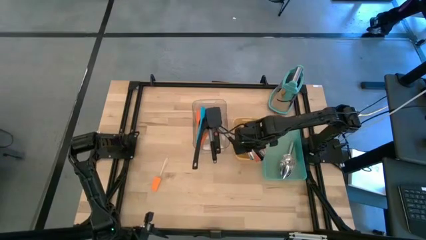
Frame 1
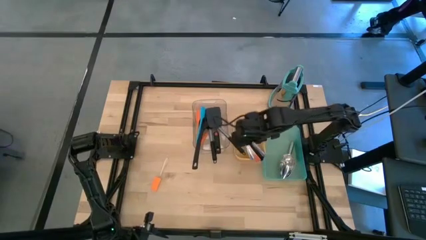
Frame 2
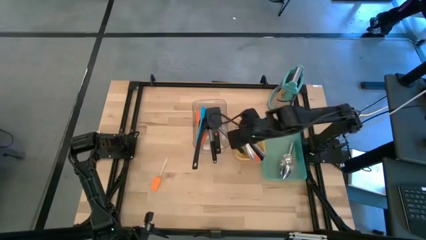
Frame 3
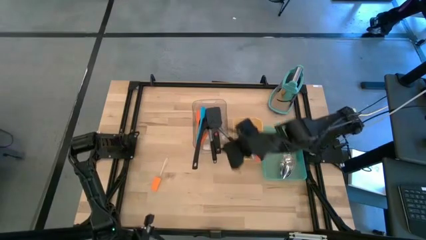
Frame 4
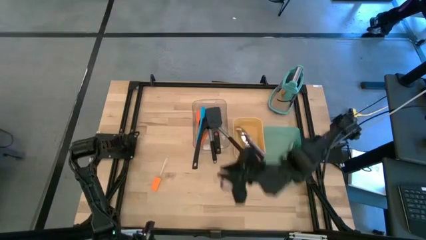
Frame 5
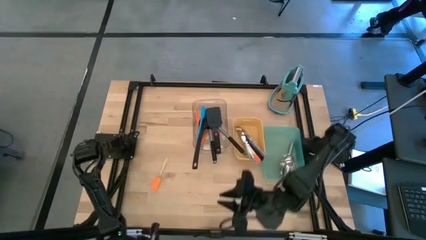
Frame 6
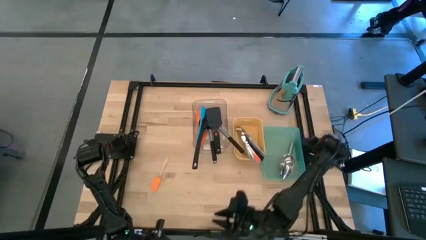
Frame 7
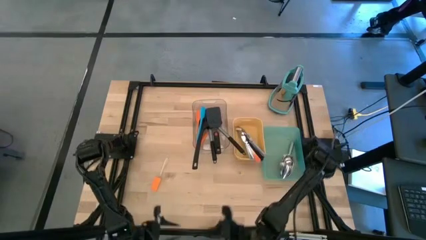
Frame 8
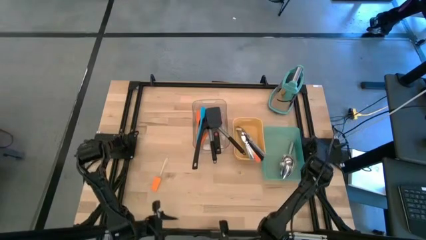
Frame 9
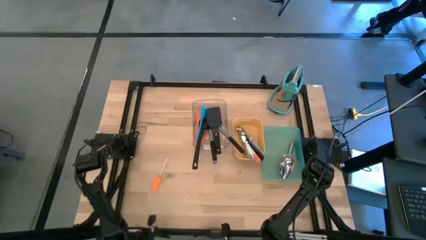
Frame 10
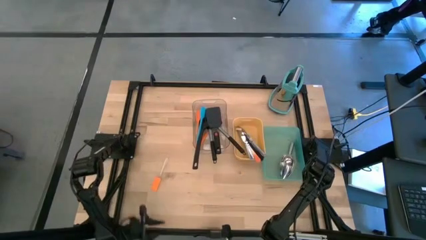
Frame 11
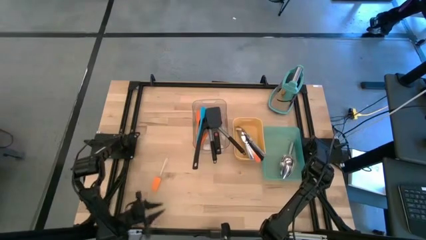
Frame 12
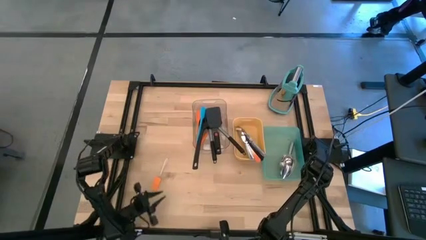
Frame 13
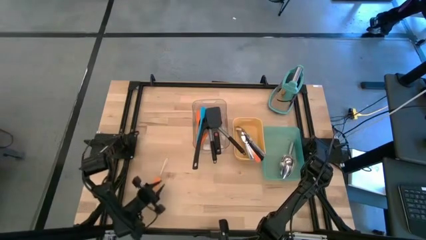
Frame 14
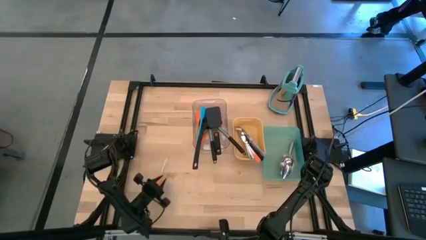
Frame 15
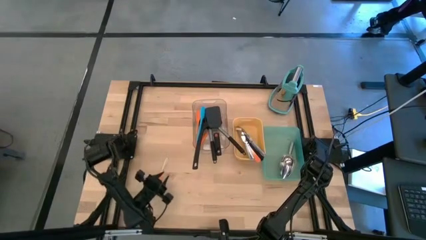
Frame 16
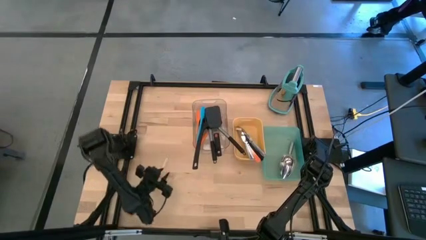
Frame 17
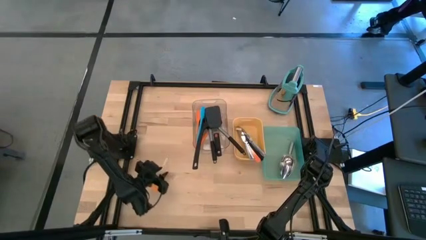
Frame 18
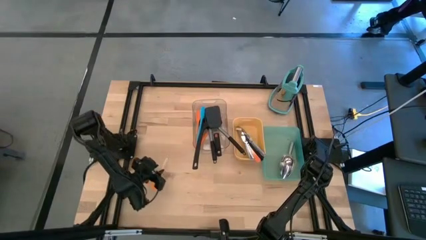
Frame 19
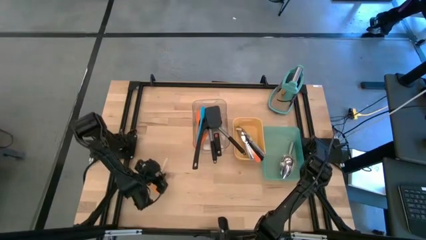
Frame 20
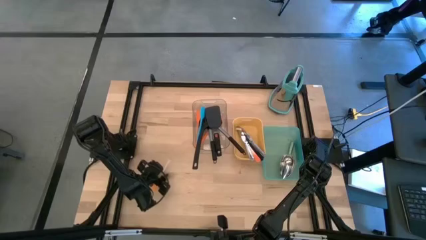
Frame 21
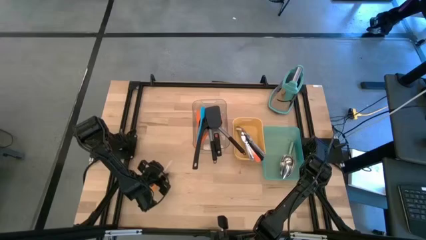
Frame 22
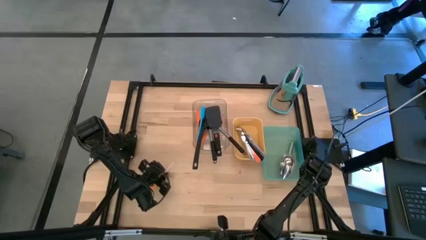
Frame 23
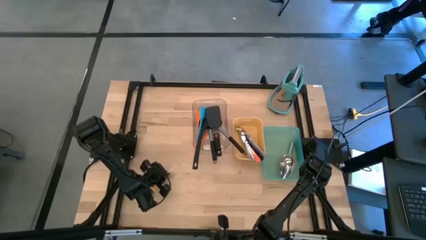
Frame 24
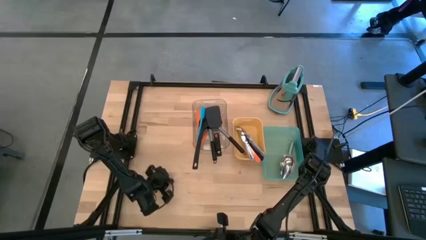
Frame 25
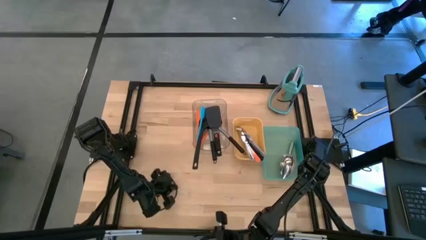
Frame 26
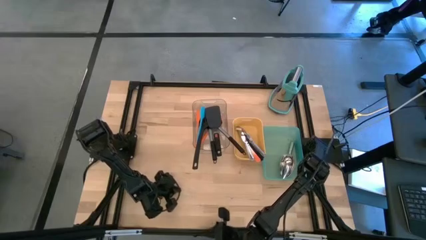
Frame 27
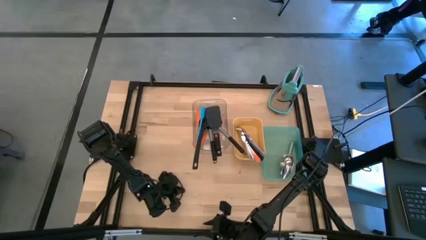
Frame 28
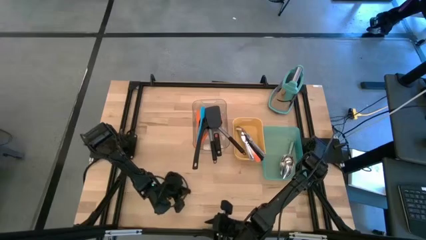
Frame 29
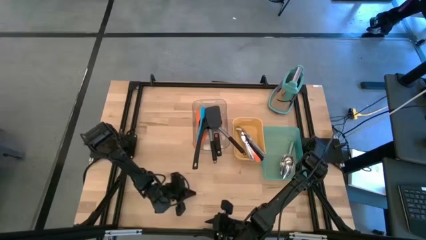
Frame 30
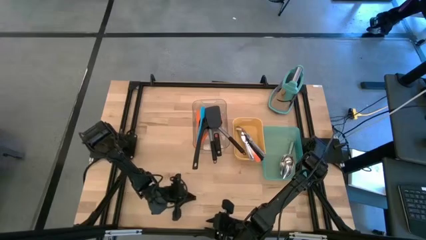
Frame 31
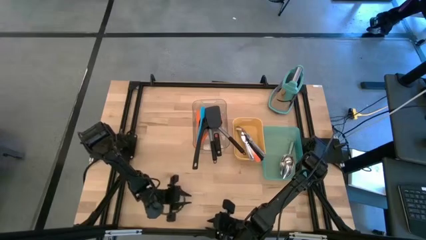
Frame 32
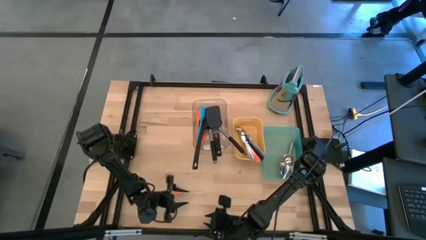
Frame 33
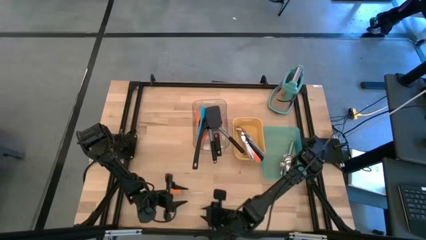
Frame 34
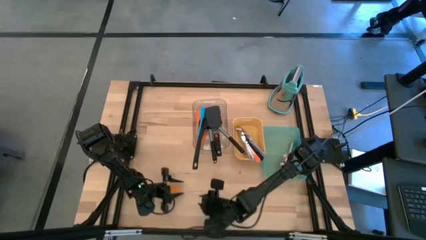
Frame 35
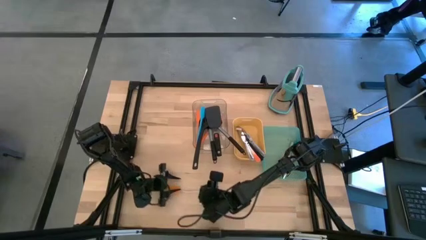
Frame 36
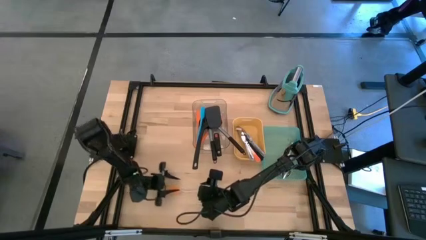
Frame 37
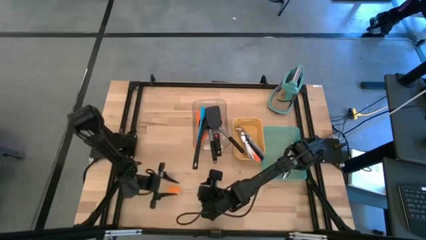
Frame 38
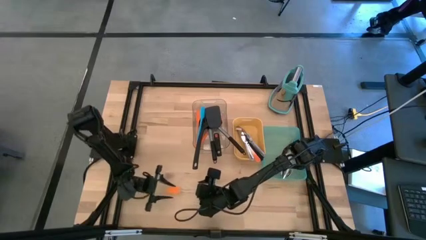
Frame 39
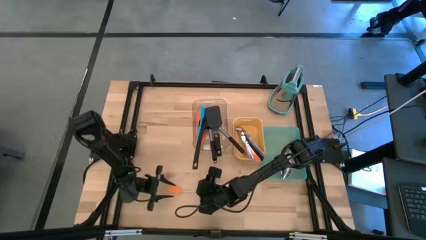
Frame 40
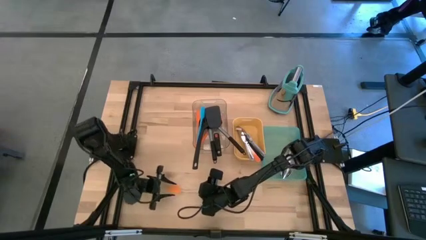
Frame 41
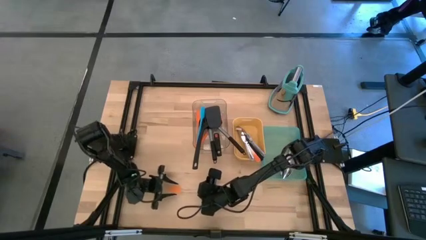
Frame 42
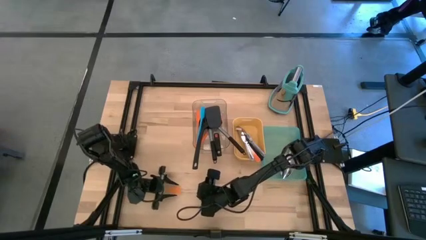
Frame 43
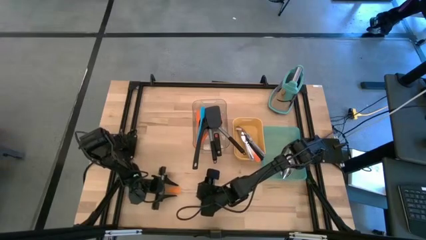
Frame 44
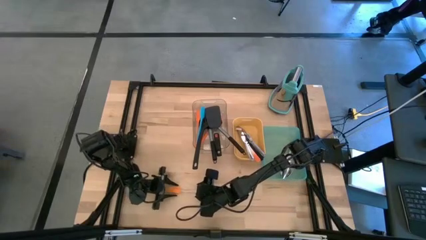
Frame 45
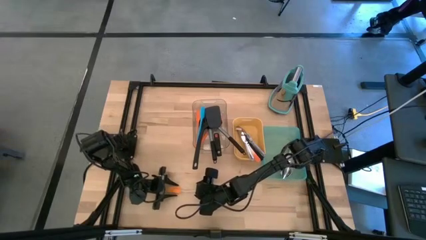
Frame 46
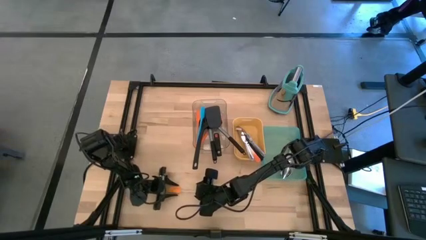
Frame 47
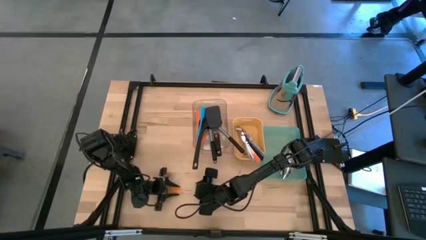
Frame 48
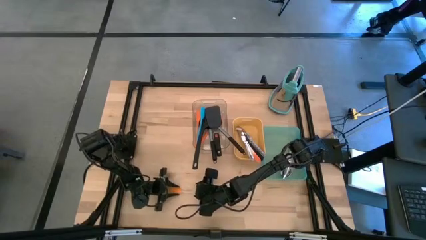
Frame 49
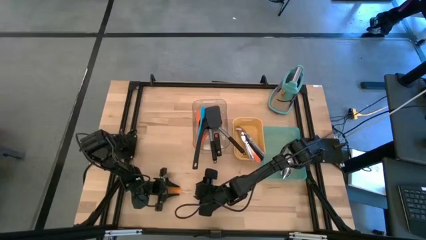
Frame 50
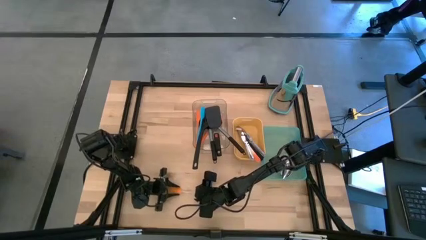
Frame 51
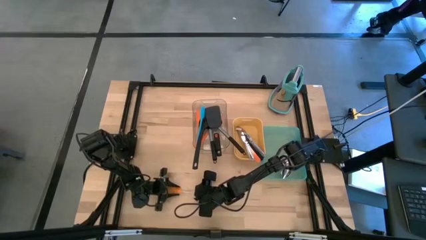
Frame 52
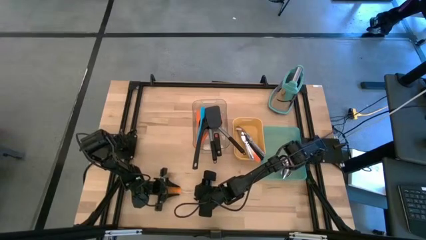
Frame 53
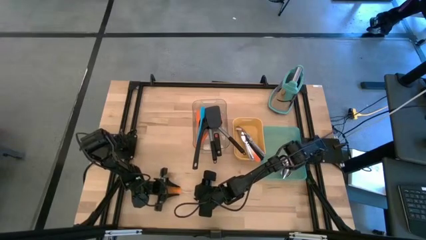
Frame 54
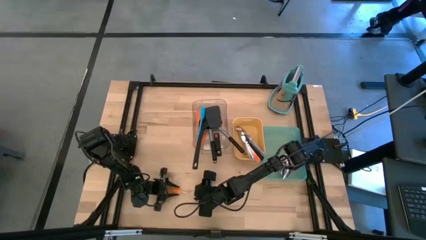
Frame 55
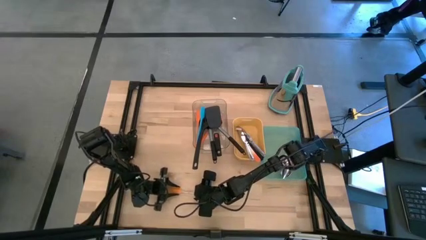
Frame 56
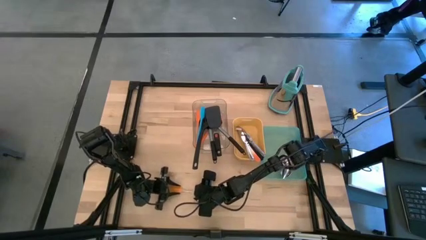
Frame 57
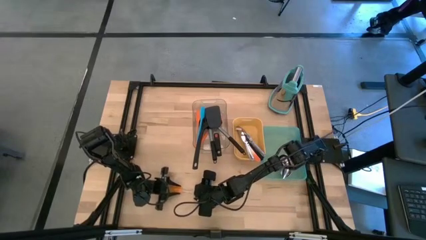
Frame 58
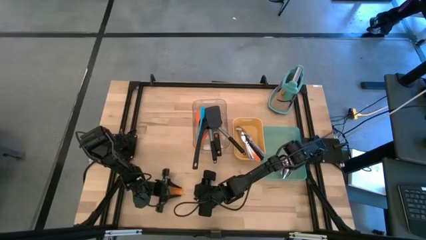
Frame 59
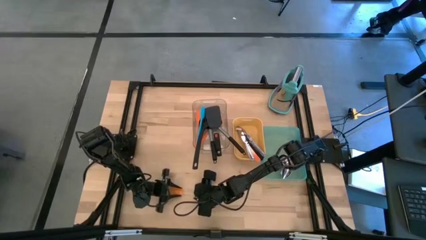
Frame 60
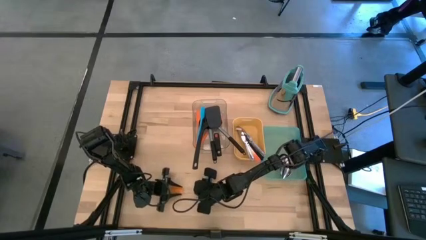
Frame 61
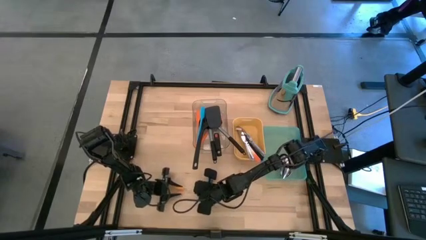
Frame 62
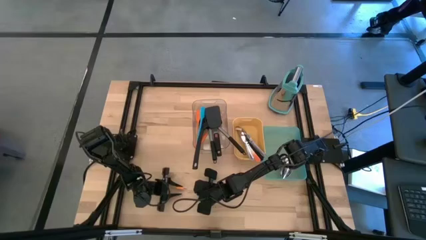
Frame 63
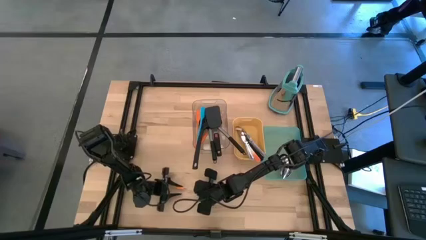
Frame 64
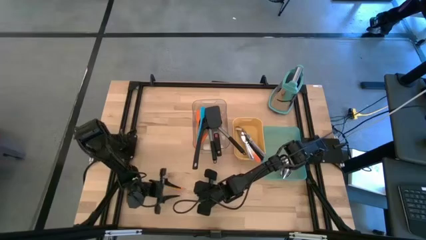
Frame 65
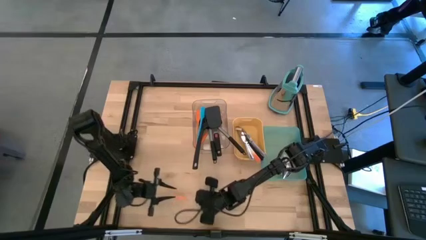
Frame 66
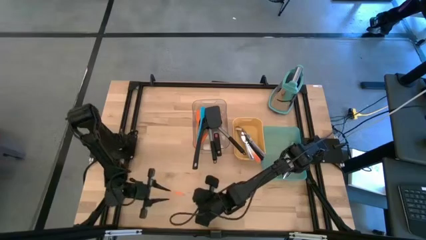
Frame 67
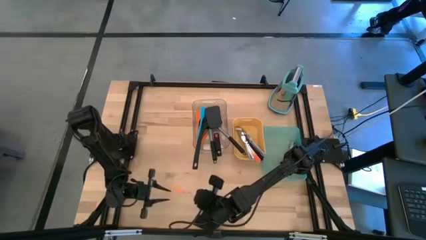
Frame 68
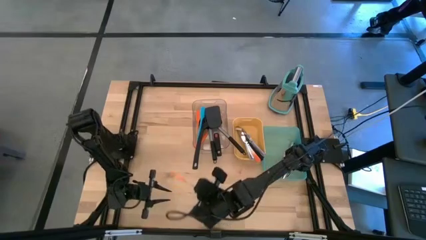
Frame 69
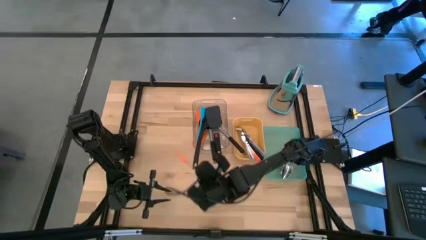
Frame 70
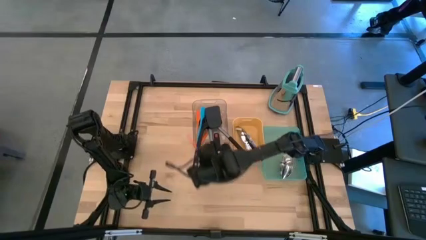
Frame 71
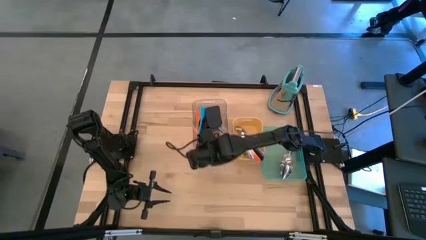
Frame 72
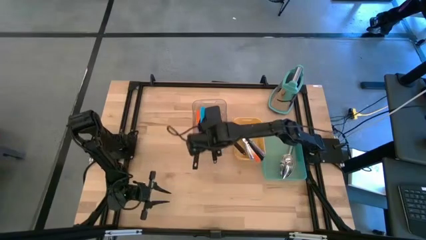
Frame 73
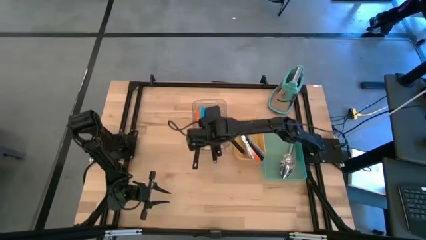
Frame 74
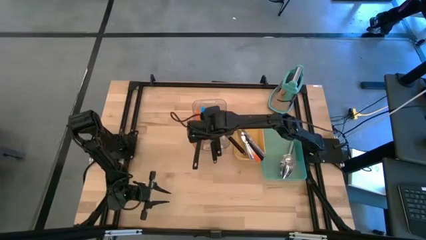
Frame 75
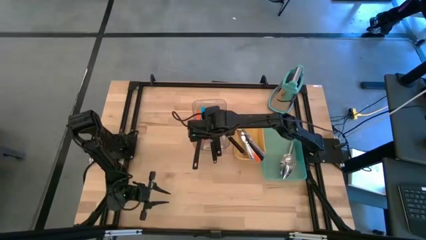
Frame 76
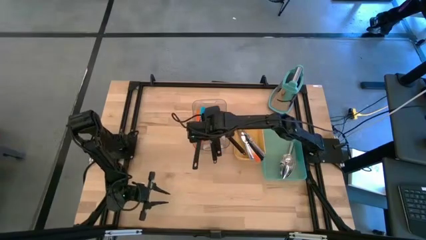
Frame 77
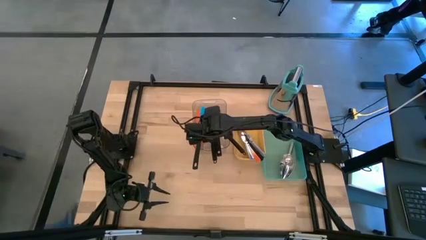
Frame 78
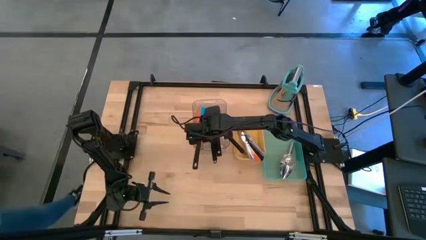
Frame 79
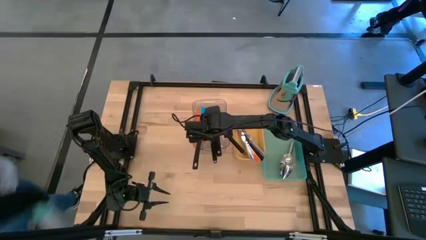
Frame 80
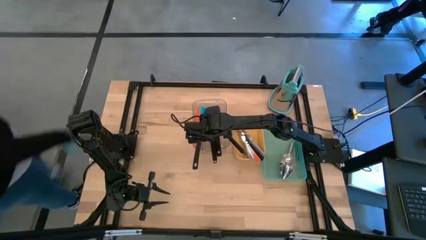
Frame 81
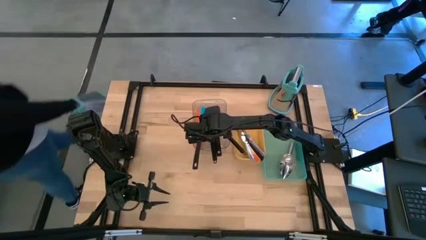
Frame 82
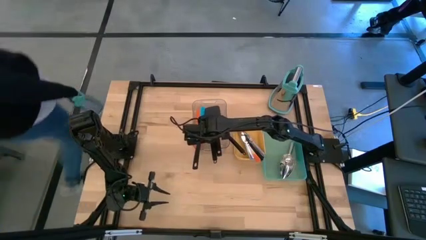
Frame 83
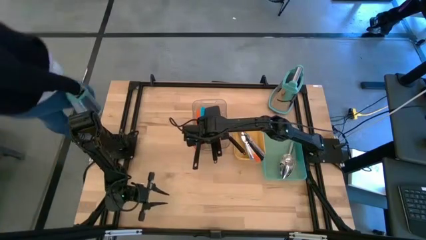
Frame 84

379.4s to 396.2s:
Task: Pick & Place Kitchen Items
Put the orange spatula into the transparent bin
